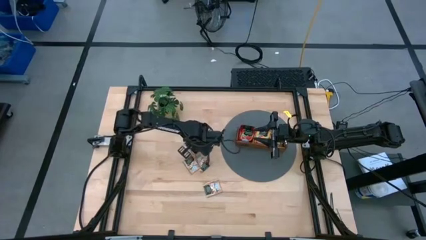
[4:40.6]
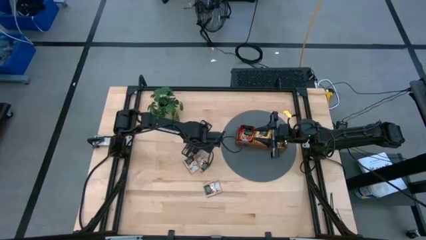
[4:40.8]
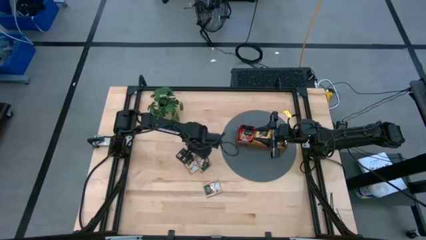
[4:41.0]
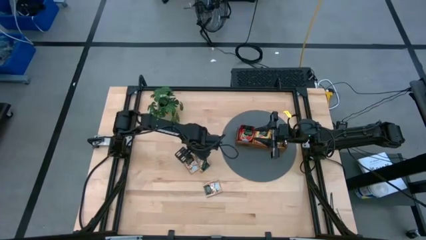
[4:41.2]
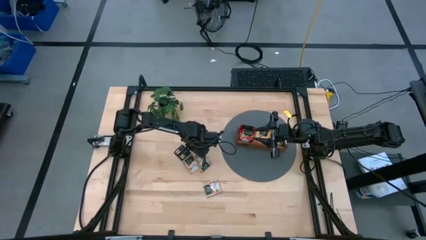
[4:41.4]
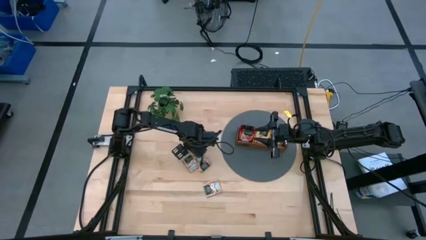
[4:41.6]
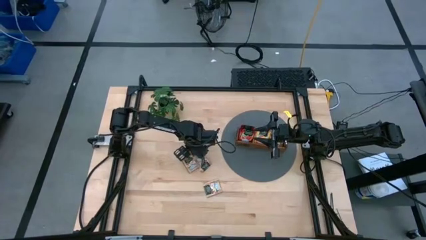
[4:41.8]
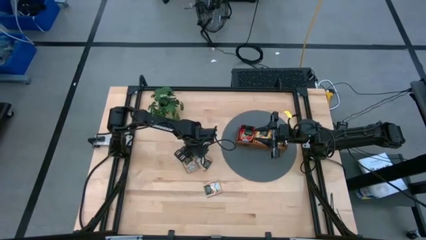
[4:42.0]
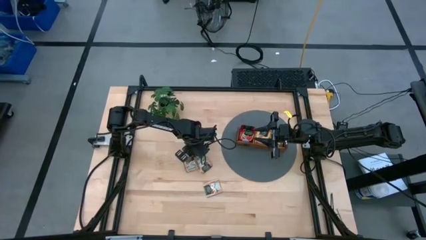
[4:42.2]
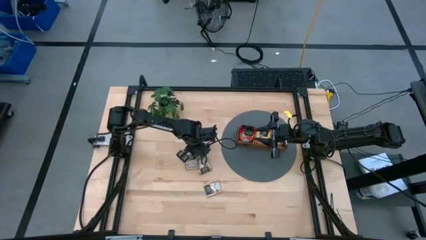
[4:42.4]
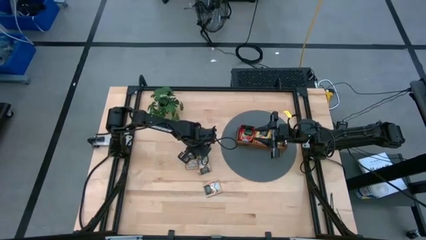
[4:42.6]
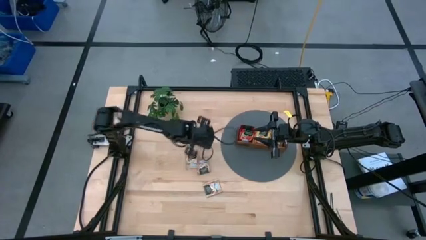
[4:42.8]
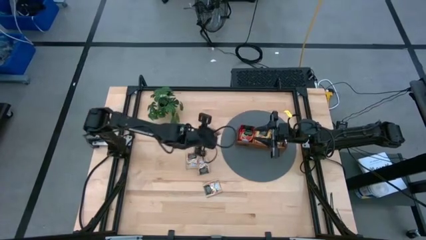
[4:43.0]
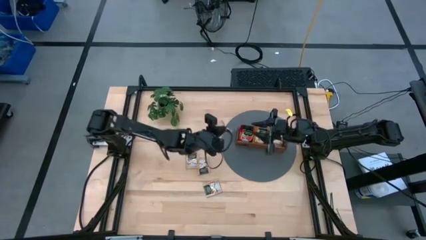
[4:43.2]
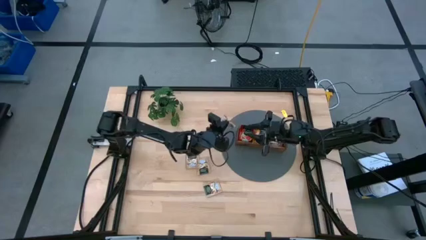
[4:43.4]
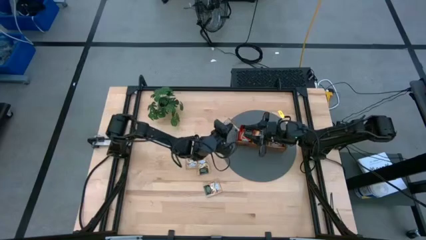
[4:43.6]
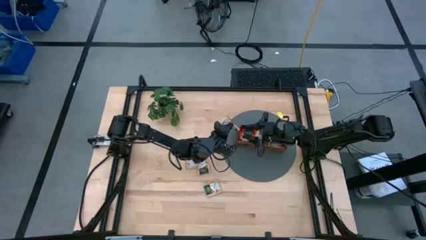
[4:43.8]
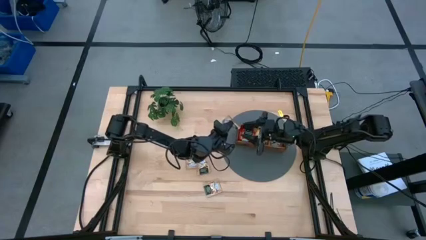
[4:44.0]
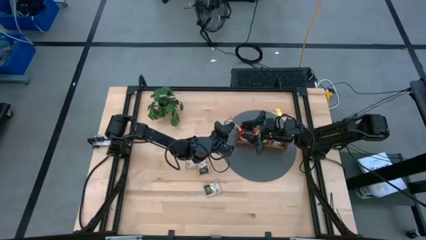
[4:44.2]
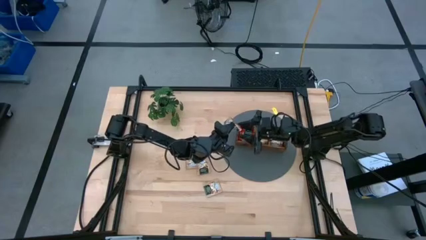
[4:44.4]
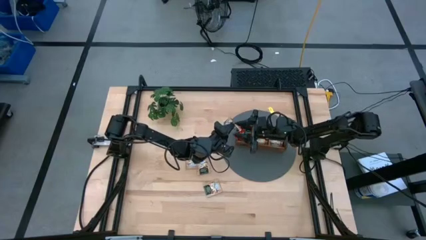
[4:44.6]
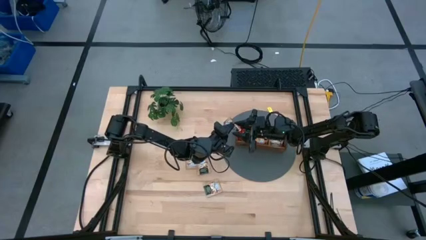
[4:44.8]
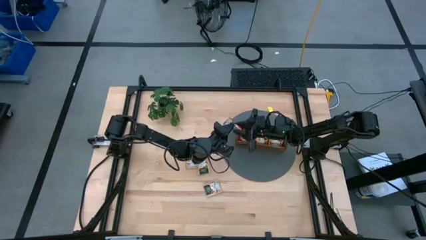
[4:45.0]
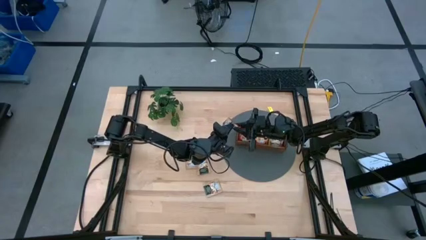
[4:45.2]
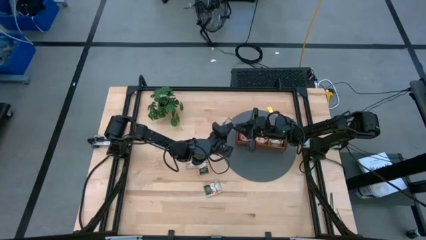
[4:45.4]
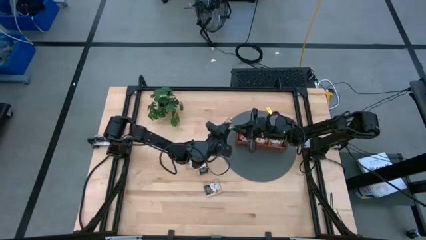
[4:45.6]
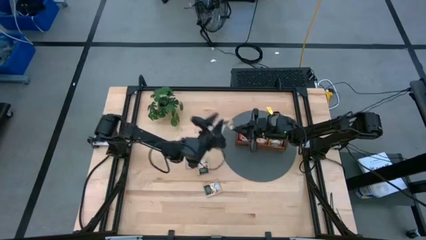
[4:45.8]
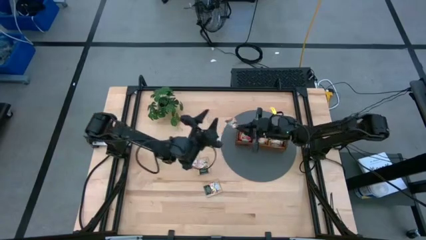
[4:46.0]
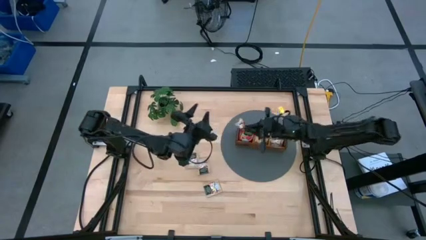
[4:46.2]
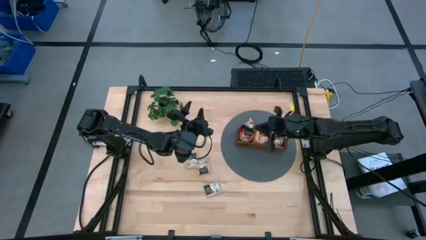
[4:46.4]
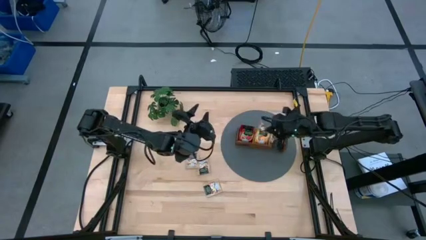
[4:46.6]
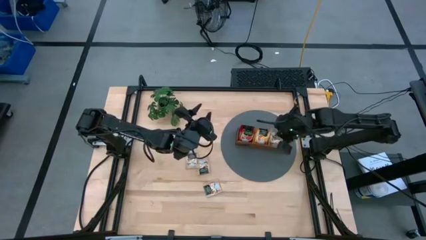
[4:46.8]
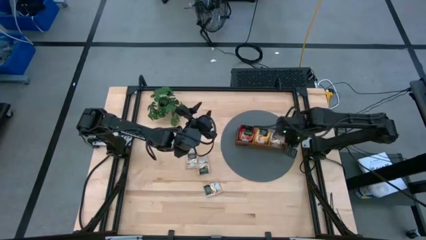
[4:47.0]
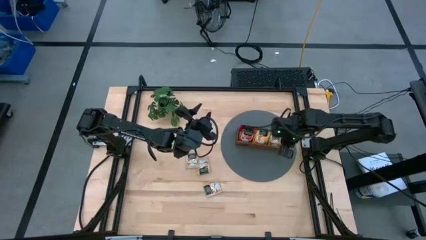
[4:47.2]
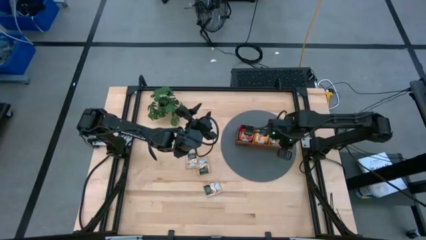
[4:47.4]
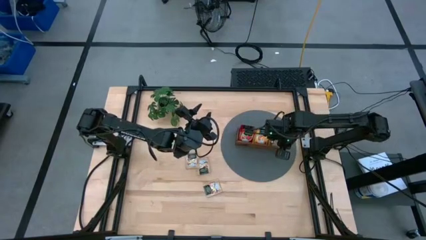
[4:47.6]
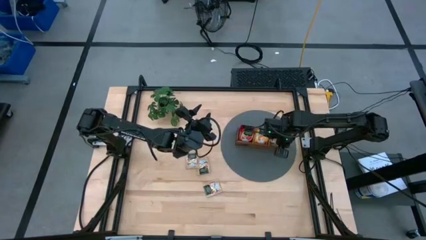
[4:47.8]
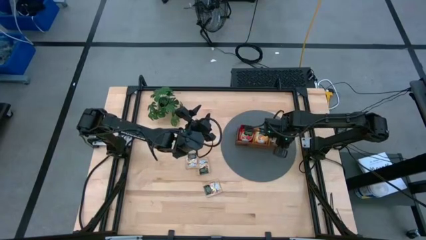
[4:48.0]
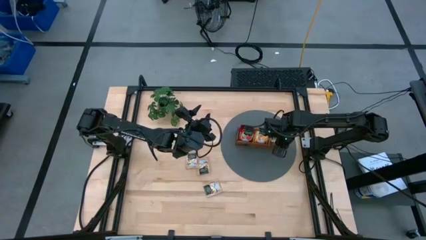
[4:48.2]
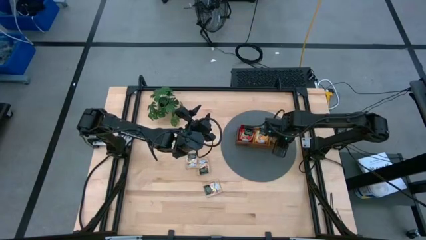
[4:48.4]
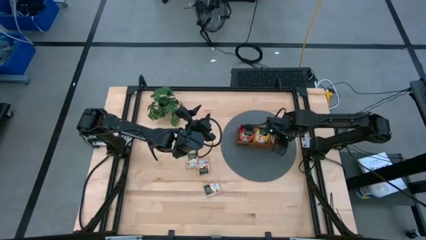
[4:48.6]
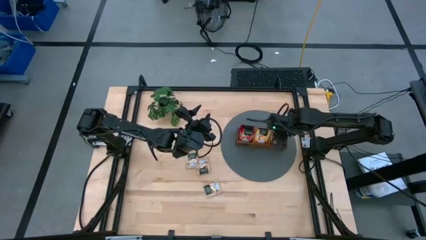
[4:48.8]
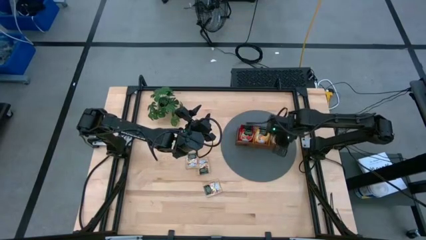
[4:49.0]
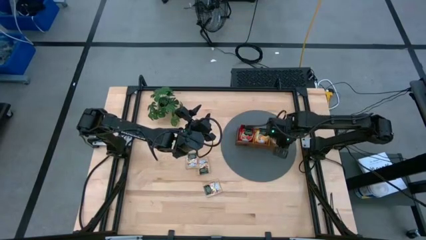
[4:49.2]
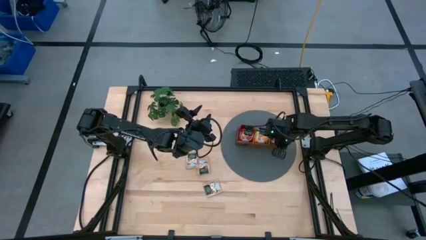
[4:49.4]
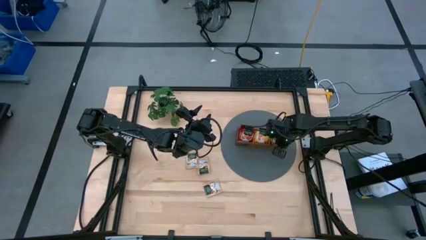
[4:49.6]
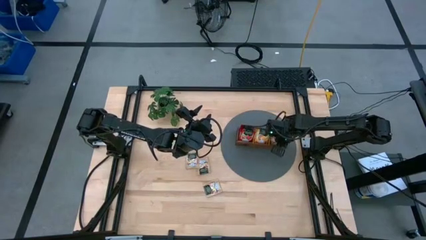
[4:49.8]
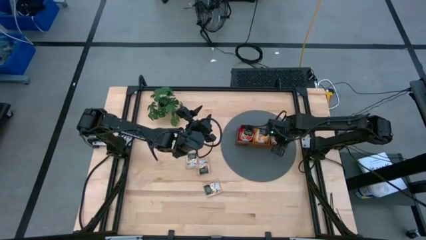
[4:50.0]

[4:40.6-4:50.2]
Task: Pick & Place Tea
Put the brown tea bag into the right section of the wooden organizer

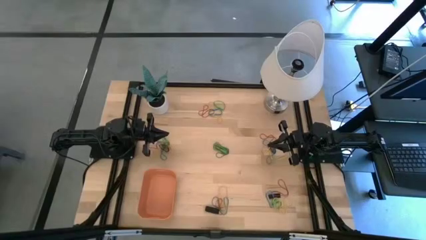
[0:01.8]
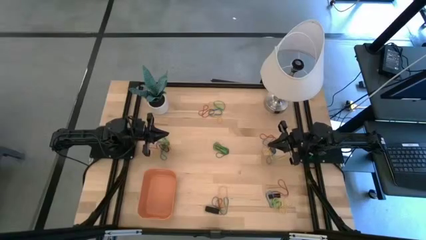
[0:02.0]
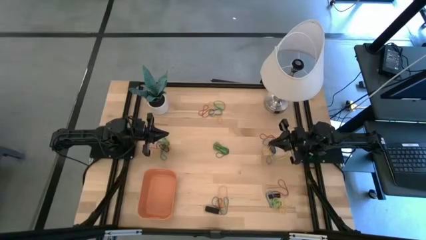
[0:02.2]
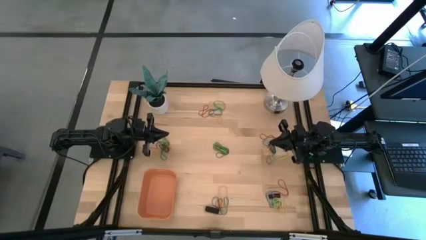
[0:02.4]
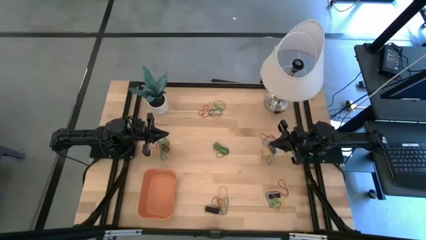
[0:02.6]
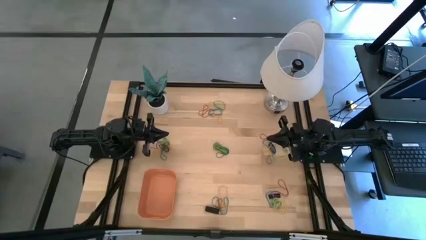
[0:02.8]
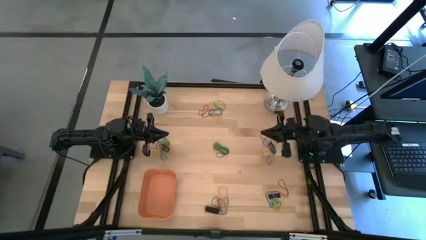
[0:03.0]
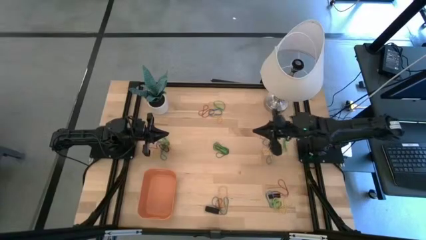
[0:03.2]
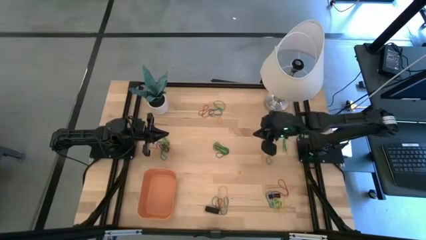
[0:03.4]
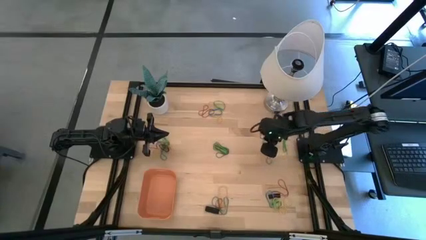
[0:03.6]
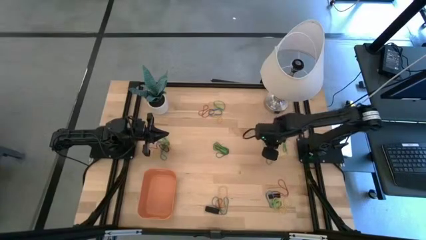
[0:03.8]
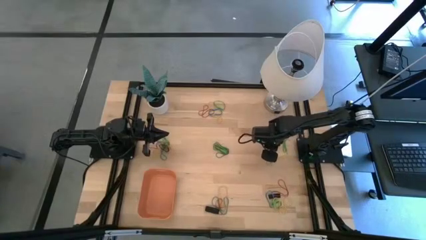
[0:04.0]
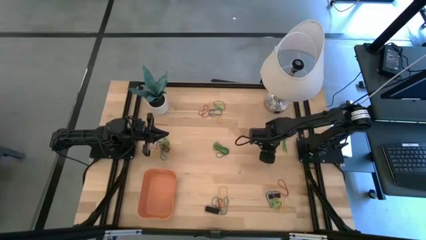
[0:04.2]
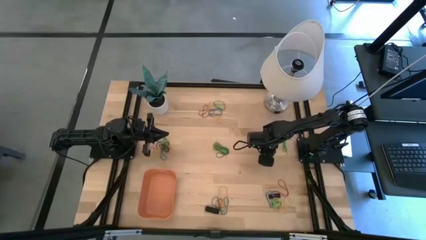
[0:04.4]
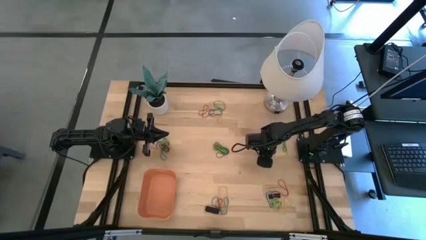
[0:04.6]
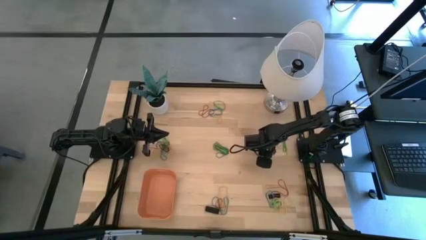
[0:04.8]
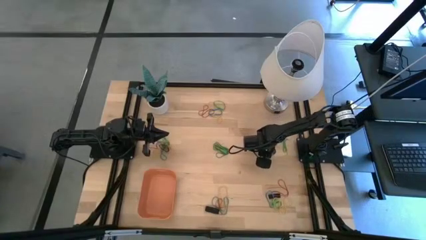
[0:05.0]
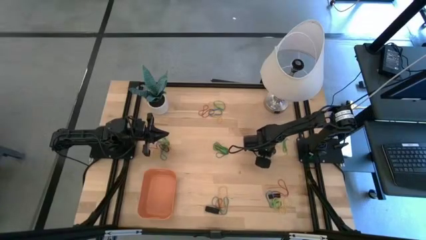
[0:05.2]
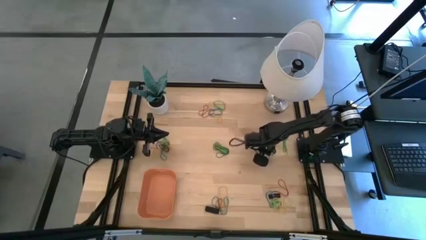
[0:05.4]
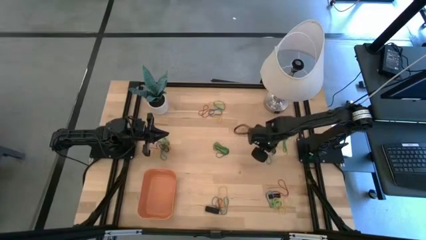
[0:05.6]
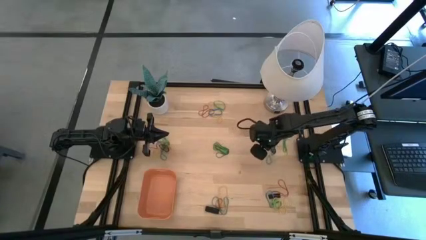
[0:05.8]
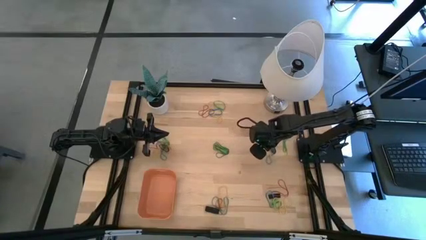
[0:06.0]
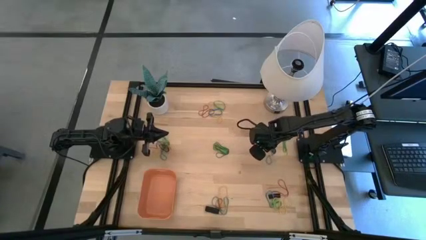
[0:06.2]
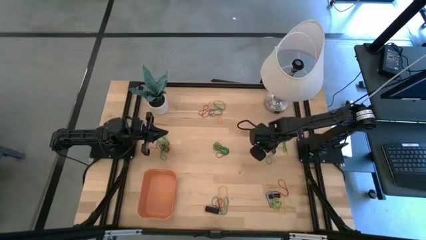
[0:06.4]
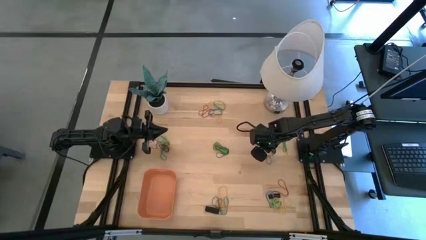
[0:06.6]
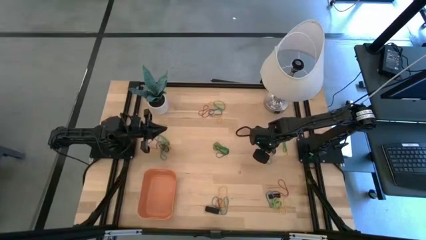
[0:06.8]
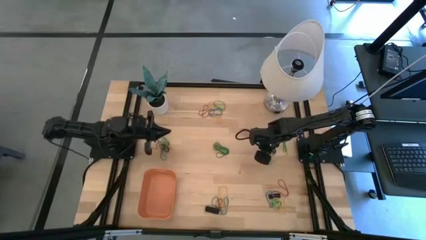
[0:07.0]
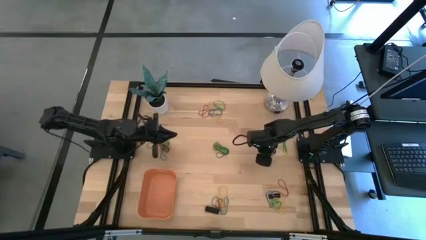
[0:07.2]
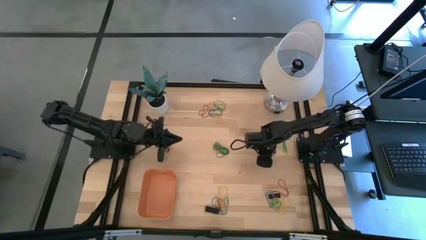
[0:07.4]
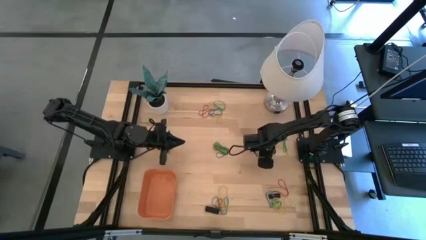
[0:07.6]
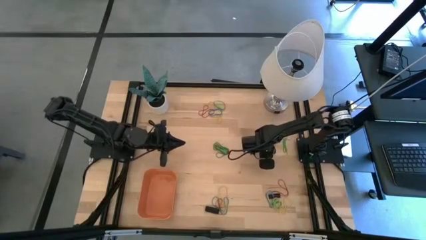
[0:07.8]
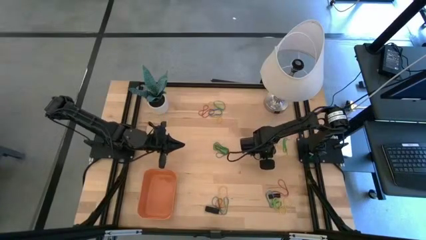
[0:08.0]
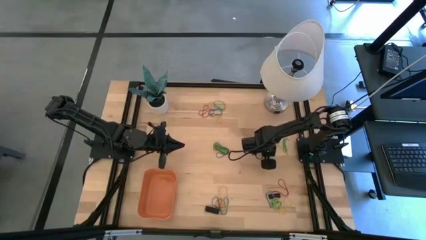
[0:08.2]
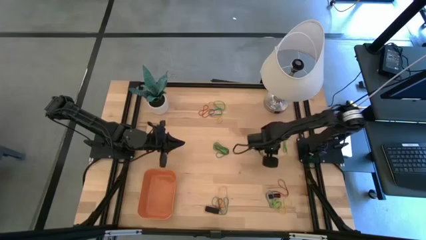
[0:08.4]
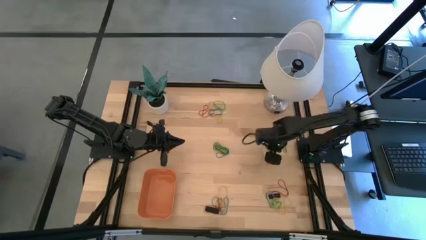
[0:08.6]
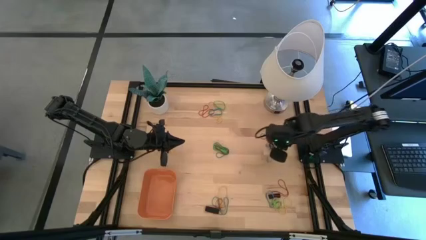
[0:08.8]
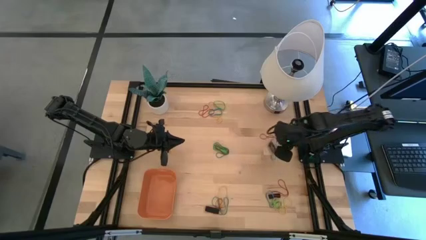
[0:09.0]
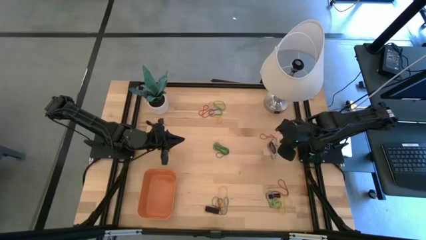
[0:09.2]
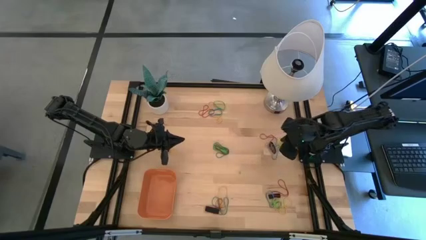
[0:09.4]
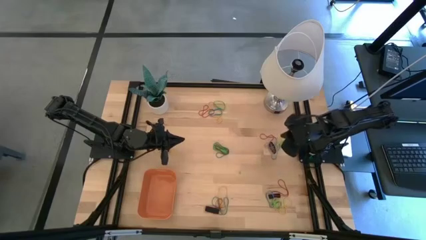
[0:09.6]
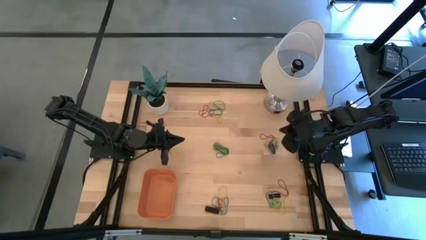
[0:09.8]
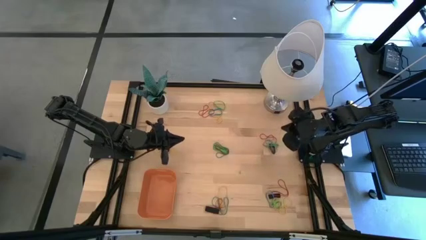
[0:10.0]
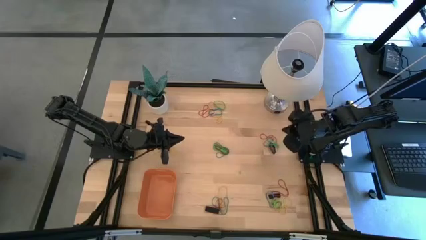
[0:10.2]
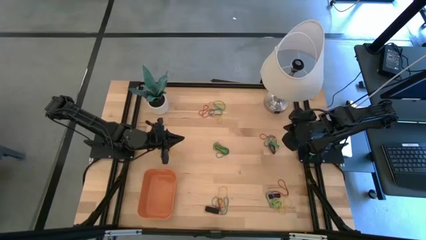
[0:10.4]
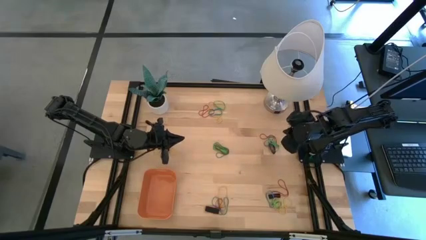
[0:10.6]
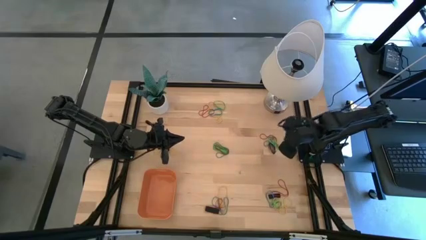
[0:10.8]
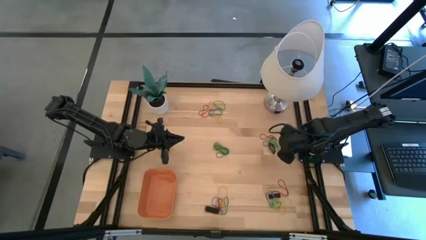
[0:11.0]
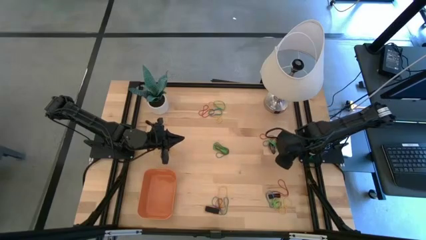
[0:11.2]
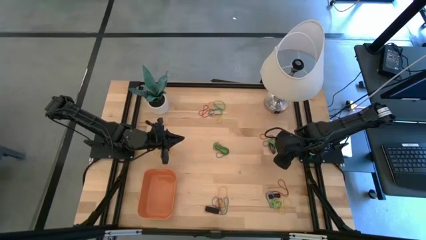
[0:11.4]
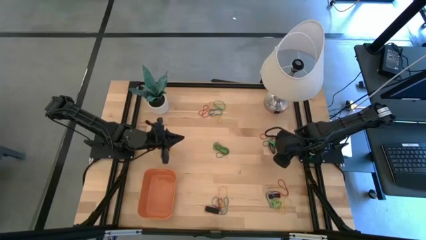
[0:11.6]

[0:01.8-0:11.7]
Task: Pick and place rubber bands into bin
Put the yellow rubber band into the orange bin
